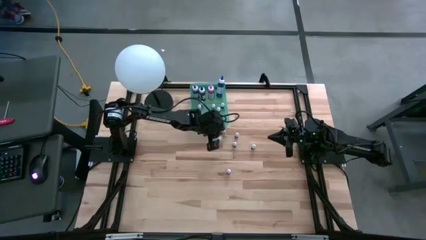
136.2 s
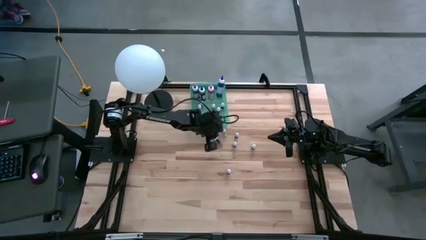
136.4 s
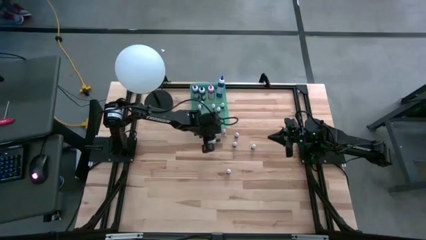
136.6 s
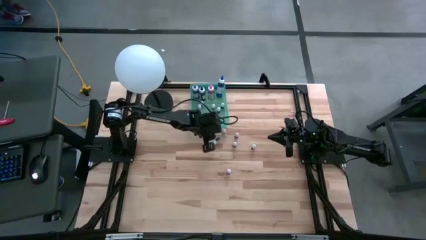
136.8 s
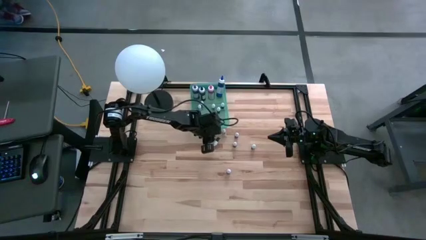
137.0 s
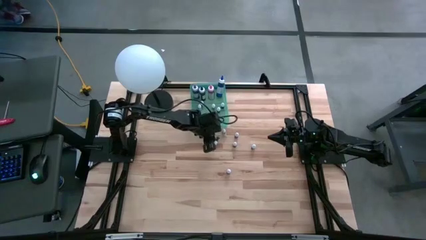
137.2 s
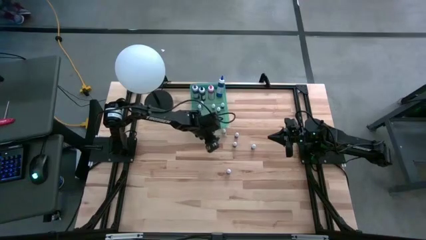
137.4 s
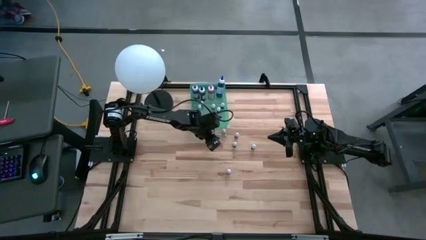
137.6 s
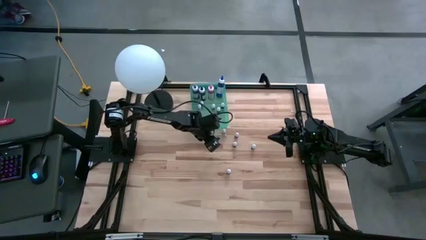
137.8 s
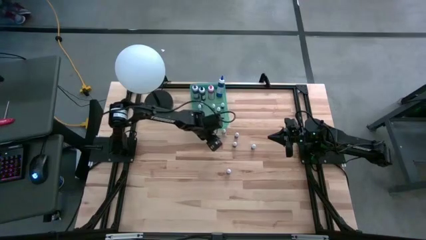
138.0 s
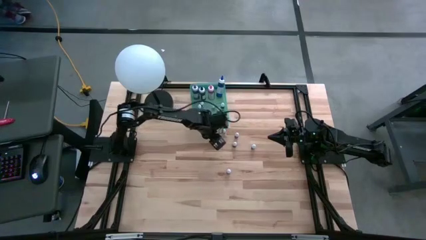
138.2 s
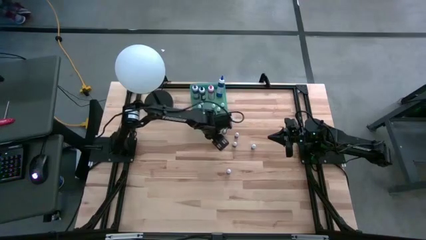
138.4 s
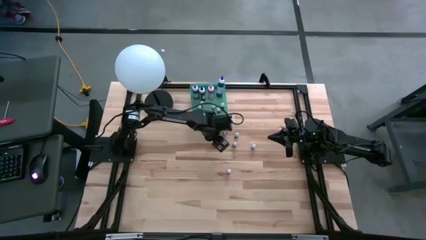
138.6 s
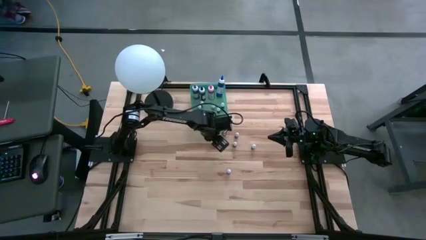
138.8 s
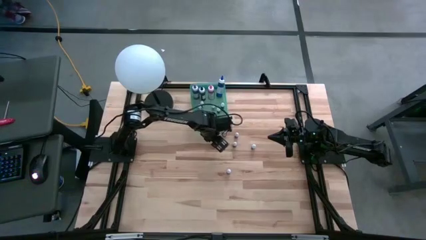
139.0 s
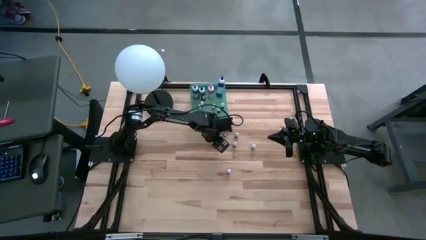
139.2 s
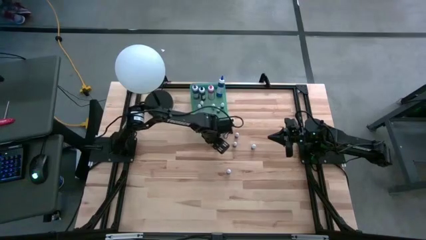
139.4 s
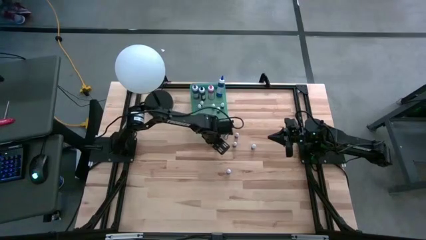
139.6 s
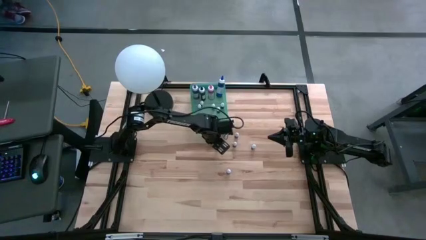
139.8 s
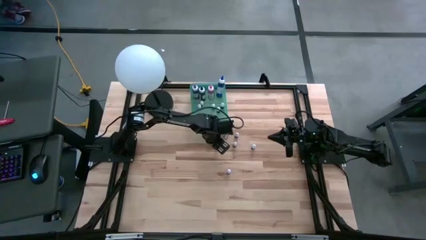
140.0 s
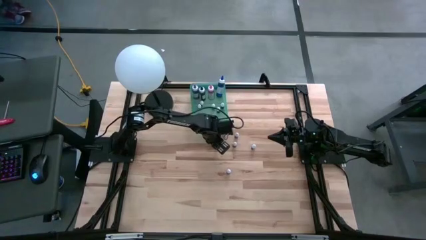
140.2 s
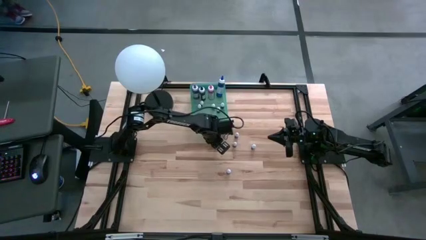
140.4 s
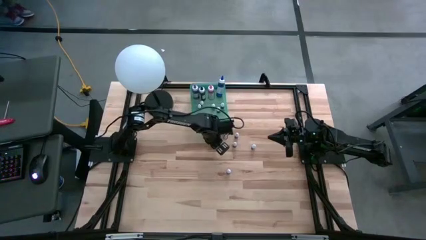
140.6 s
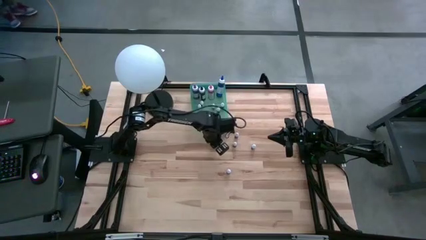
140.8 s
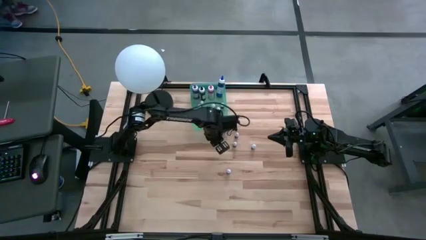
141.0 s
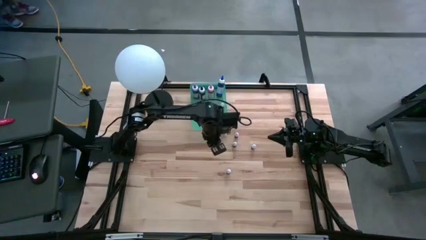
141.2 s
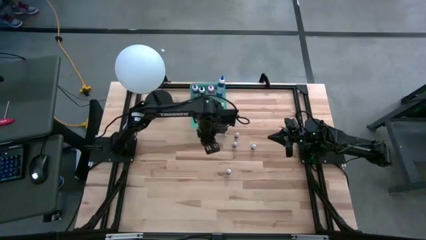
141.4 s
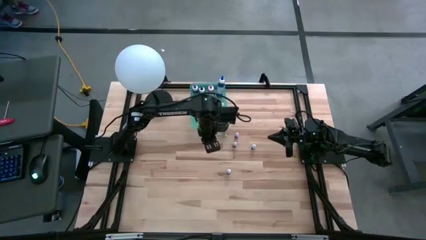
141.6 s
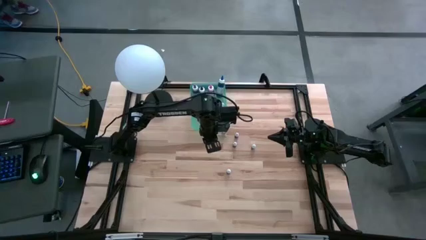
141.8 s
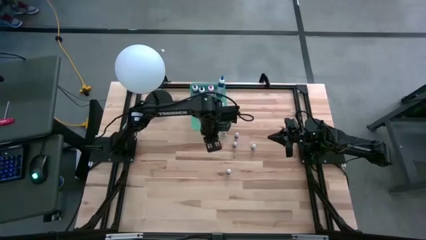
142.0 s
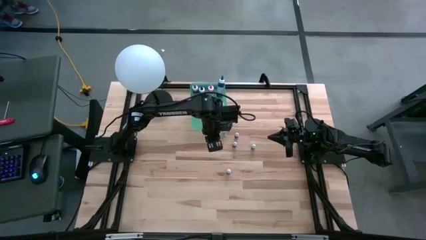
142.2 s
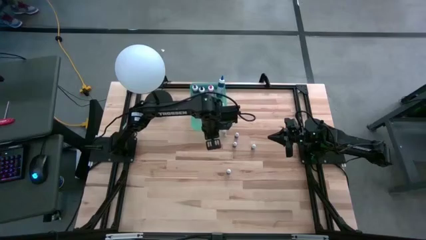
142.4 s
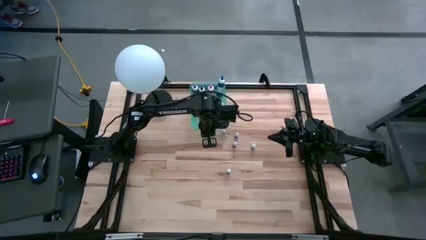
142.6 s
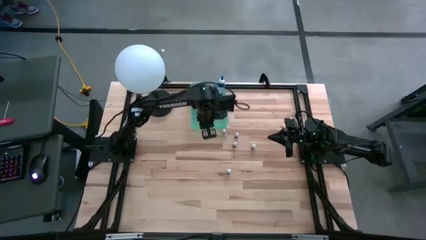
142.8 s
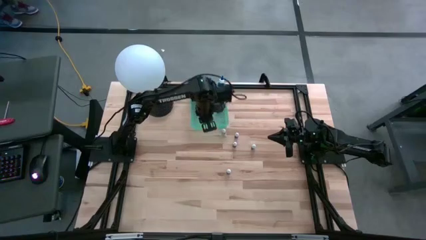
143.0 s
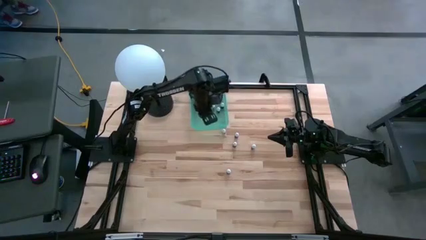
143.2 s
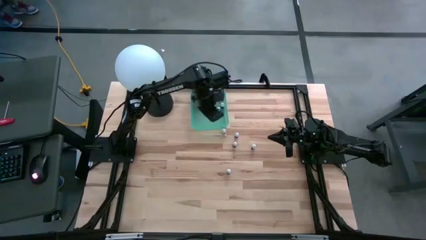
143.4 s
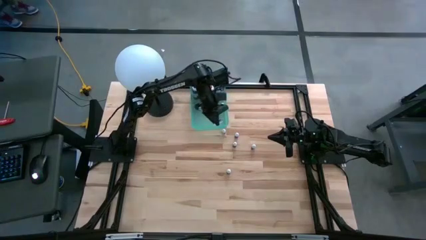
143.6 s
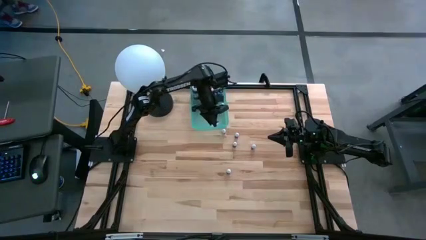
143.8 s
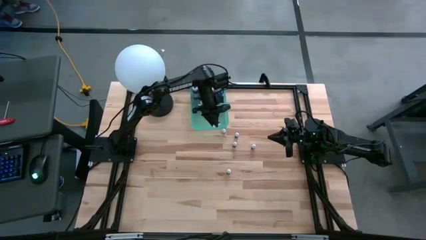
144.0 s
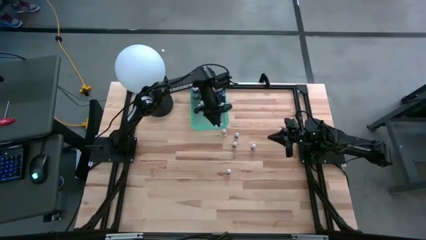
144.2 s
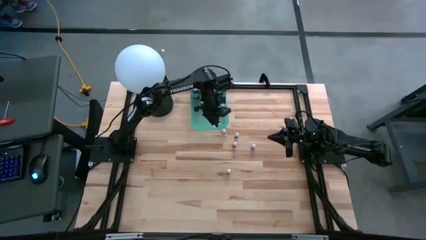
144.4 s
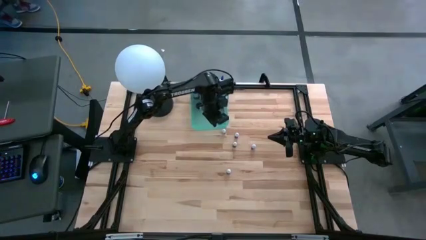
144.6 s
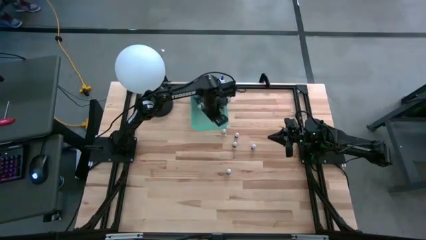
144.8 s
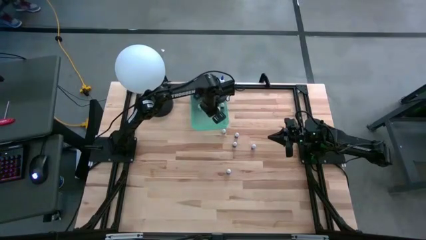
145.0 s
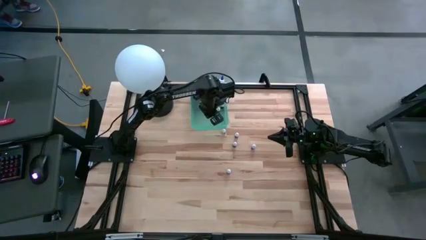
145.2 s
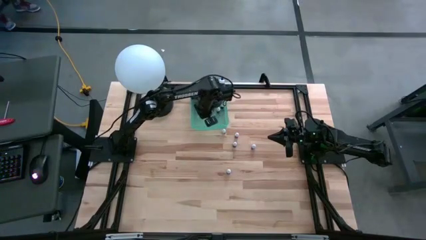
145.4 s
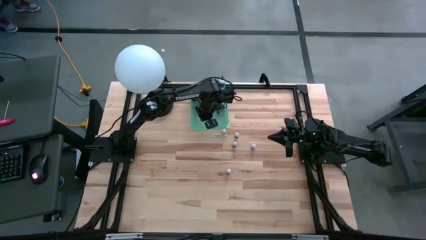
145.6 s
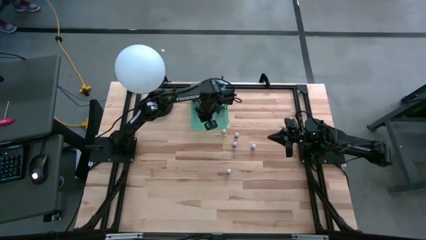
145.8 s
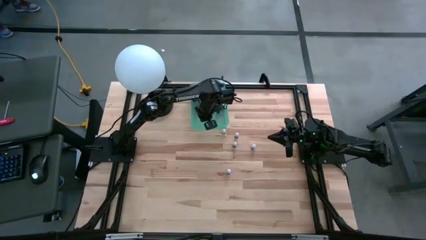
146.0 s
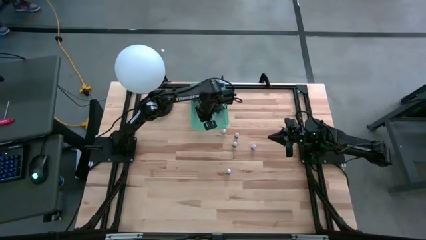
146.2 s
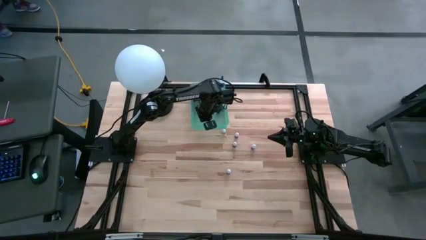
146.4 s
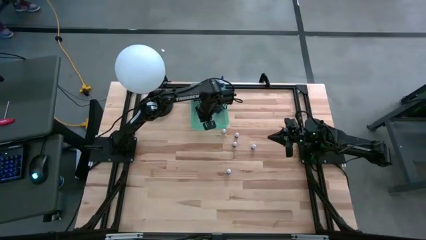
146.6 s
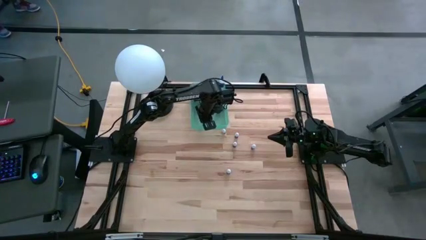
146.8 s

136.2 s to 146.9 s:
Task: Pick & Place food coloring
Put the small purple food coloring bottle into the blue bin

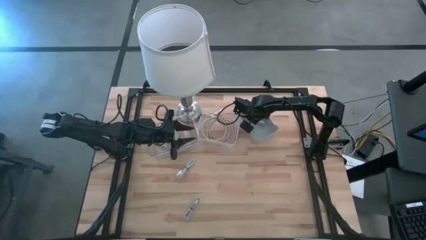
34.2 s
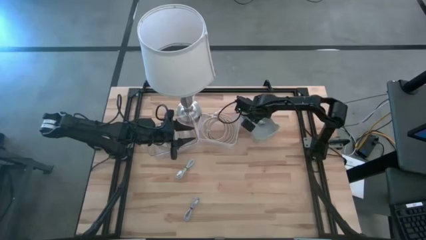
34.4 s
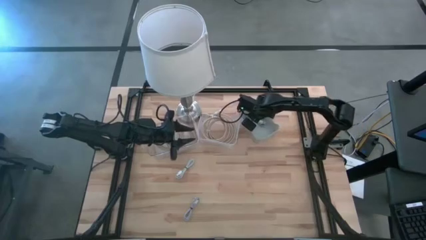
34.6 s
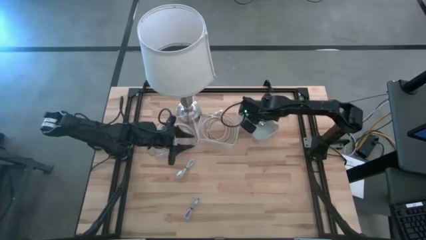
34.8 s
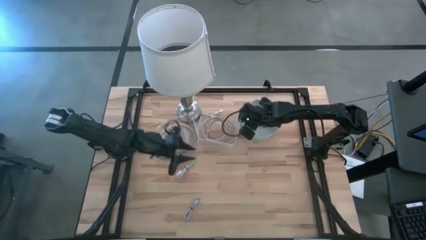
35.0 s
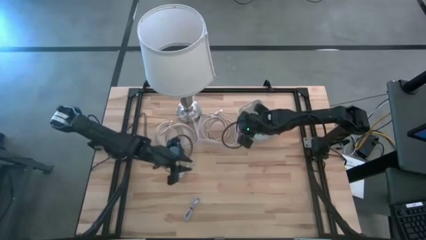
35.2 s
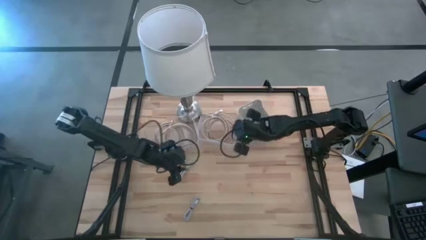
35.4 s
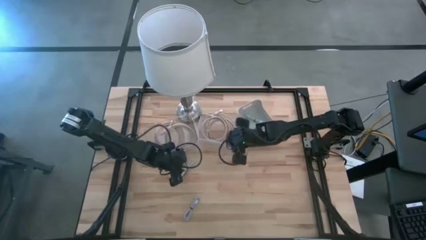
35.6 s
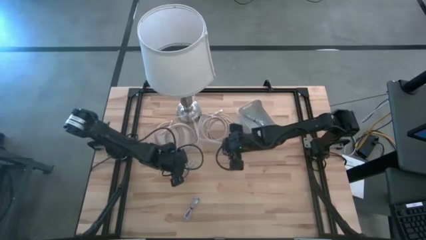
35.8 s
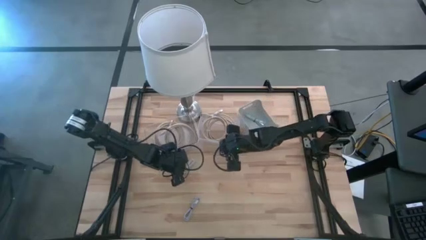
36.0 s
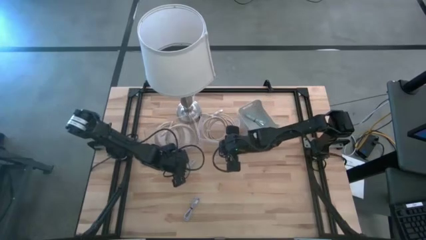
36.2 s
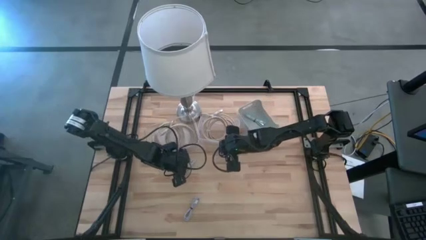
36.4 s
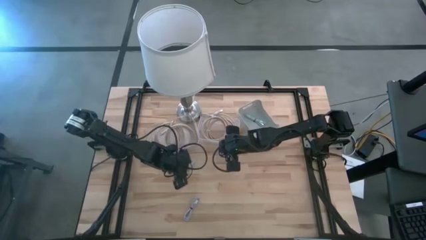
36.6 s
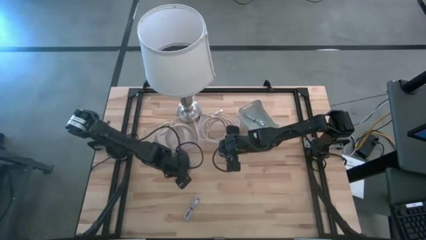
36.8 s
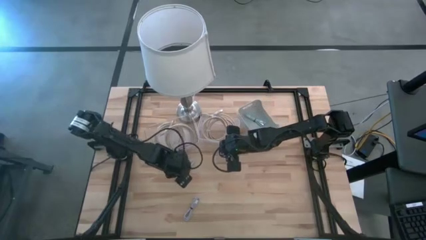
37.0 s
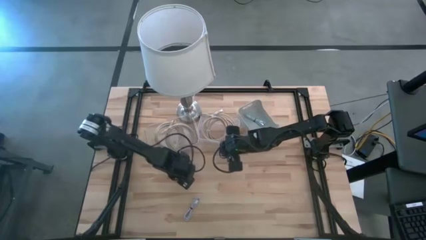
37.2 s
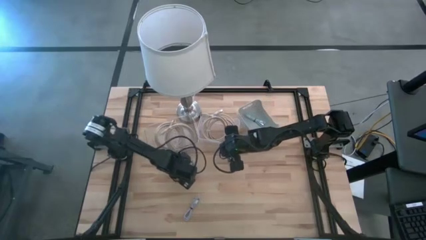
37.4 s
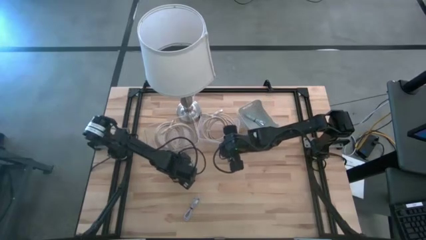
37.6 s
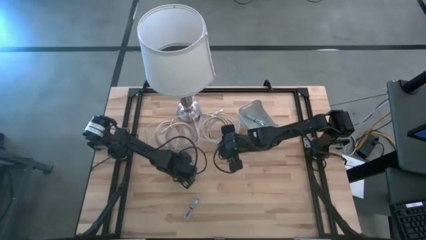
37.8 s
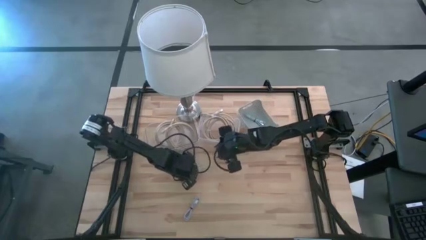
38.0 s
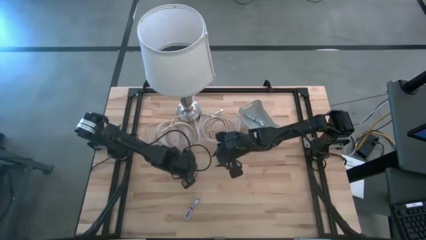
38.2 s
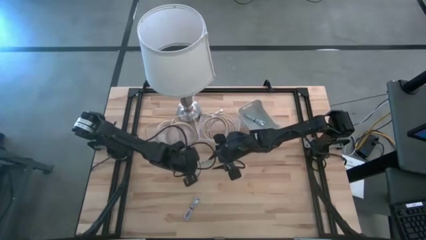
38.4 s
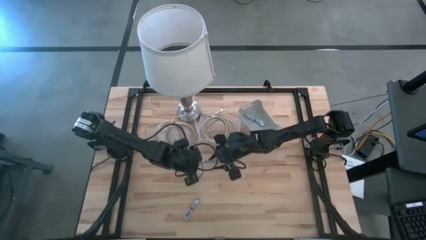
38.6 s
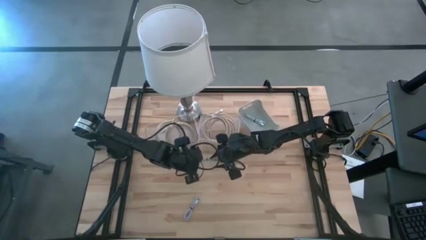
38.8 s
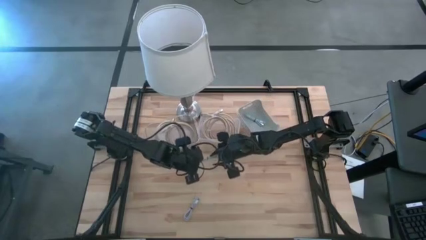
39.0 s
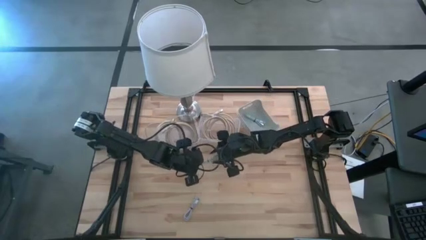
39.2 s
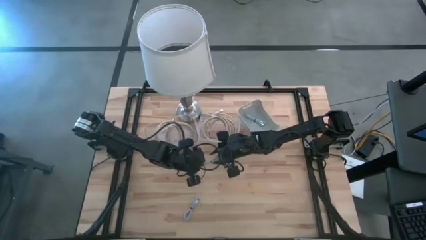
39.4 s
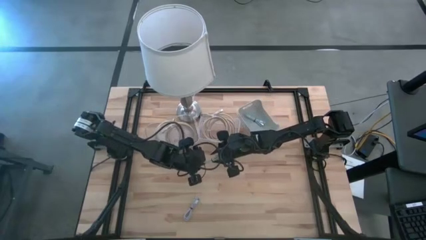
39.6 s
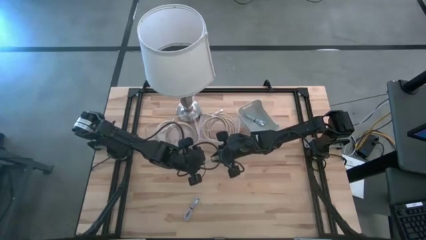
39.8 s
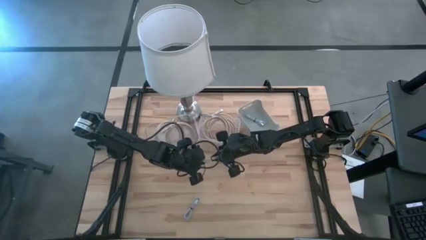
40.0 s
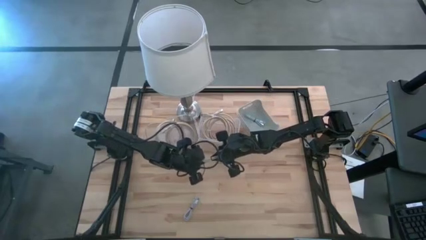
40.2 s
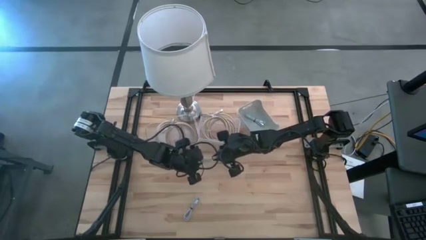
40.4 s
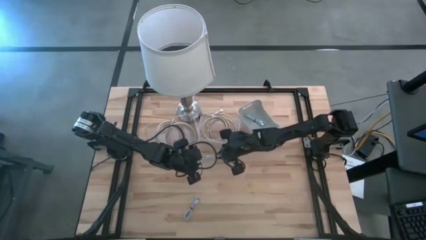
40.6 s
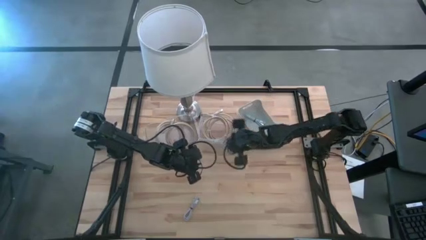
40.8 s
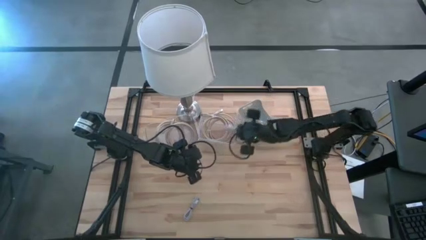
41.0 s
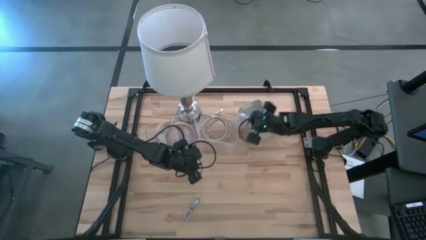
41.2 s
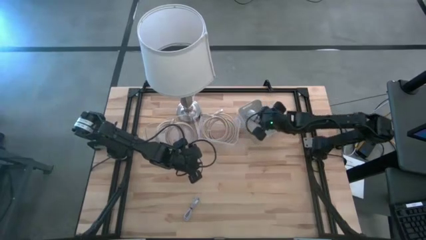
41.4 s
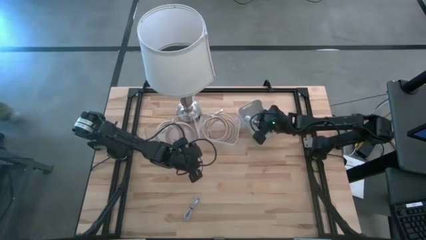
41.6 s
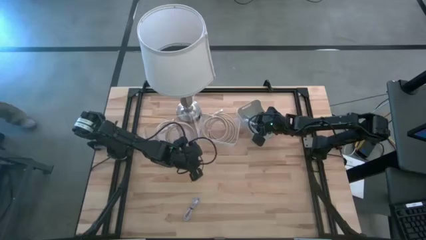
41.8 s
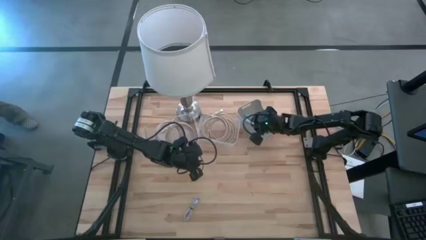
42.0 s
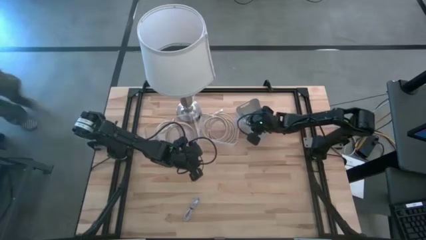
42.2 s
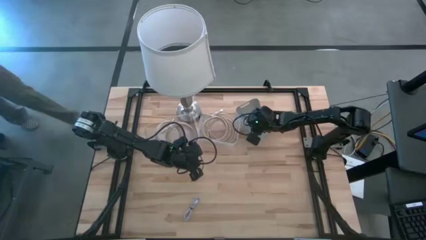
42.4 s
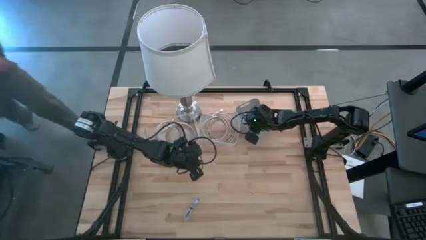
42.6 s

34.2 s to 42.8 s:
Task: Pick & Place USB Port
Put the white USB cable into the gray bin
